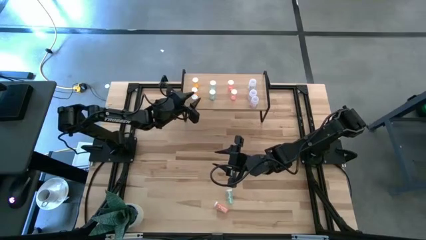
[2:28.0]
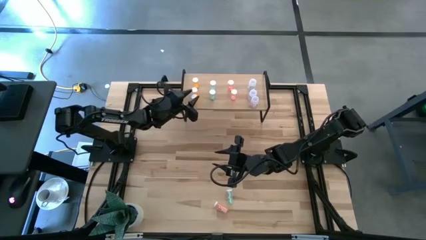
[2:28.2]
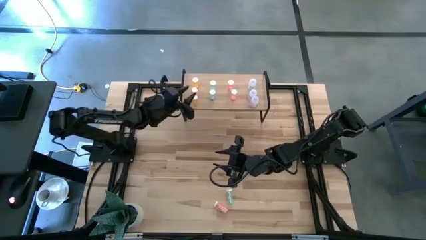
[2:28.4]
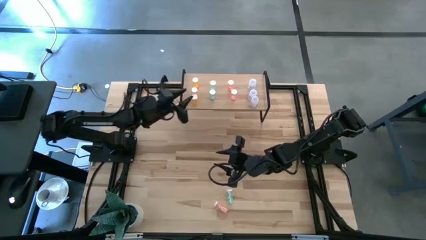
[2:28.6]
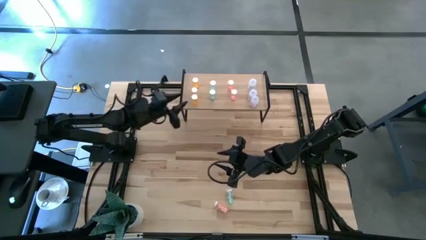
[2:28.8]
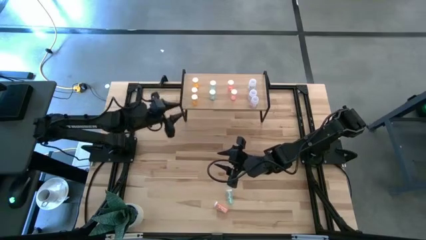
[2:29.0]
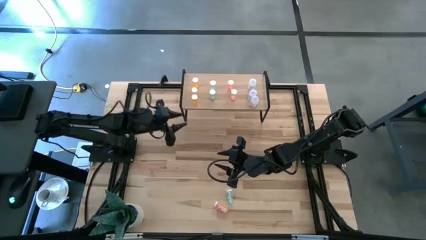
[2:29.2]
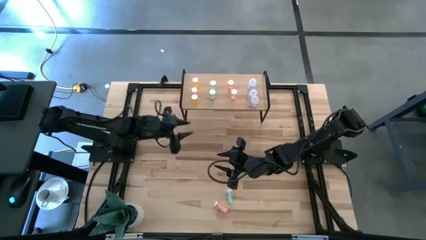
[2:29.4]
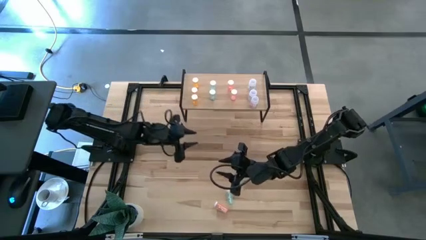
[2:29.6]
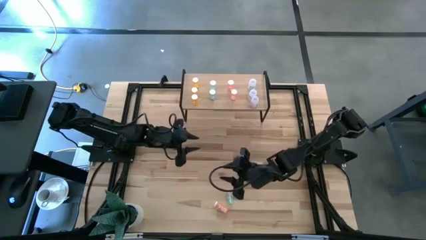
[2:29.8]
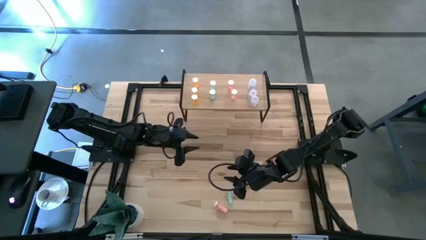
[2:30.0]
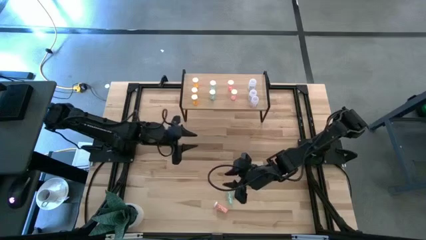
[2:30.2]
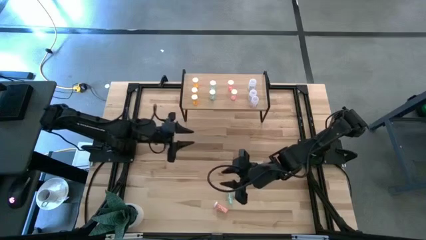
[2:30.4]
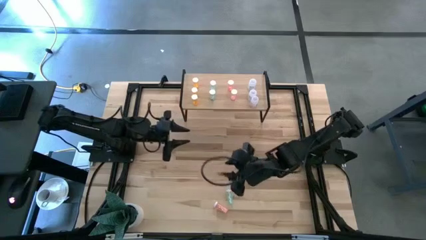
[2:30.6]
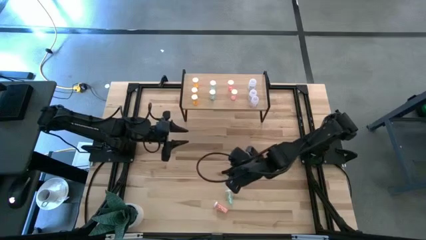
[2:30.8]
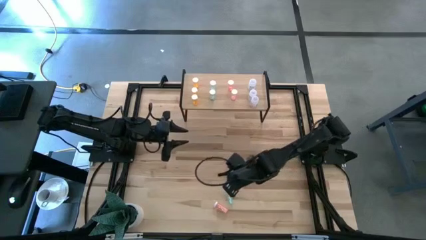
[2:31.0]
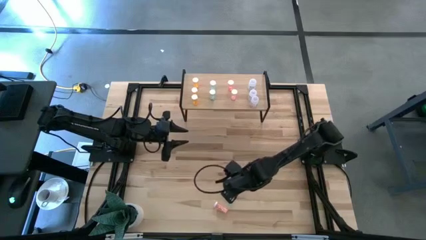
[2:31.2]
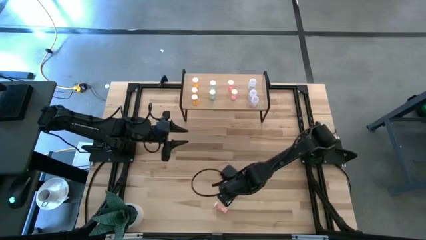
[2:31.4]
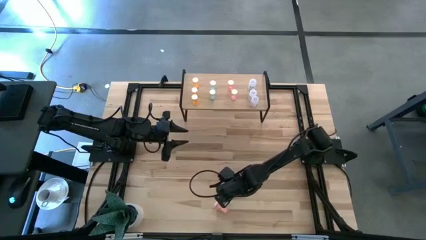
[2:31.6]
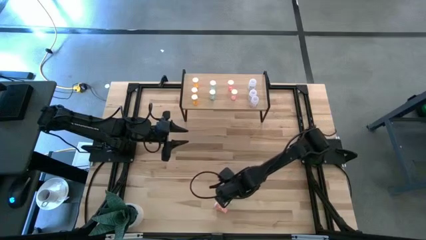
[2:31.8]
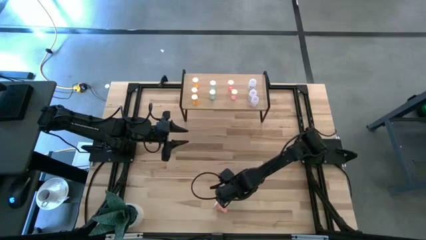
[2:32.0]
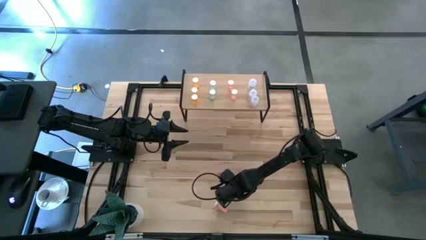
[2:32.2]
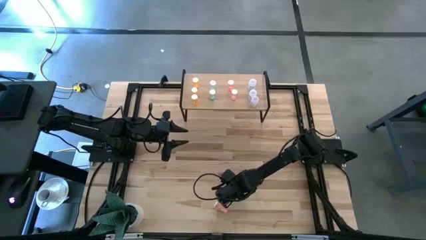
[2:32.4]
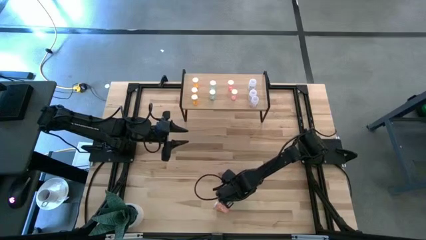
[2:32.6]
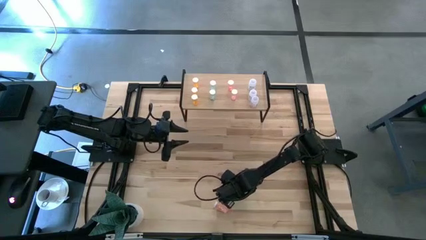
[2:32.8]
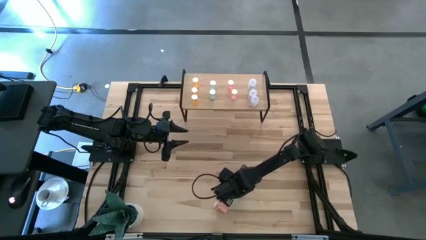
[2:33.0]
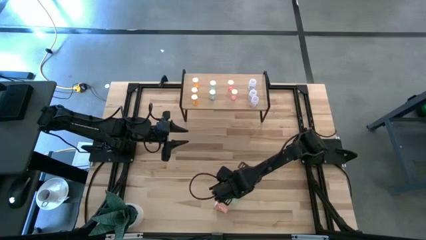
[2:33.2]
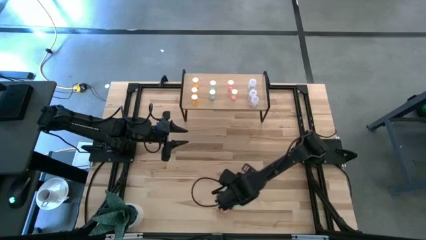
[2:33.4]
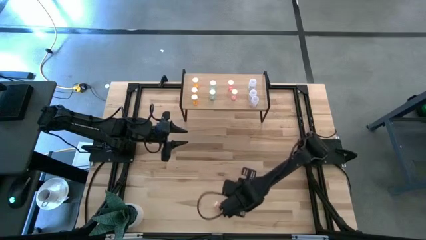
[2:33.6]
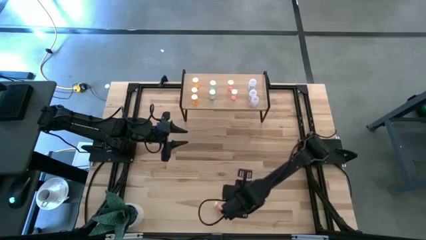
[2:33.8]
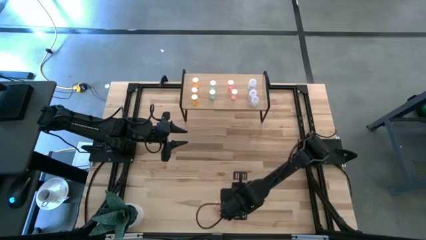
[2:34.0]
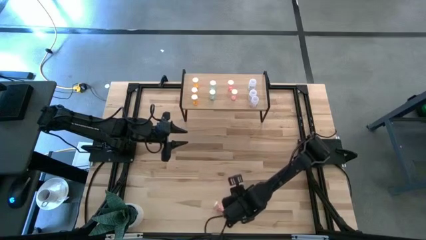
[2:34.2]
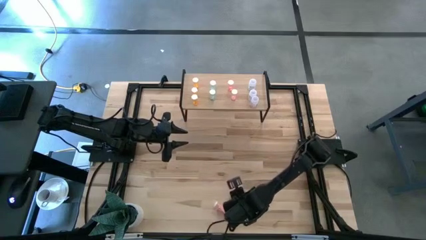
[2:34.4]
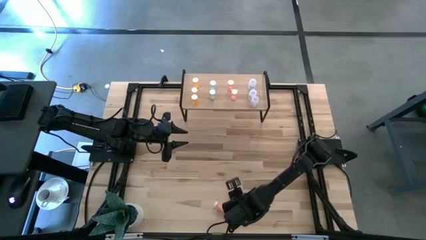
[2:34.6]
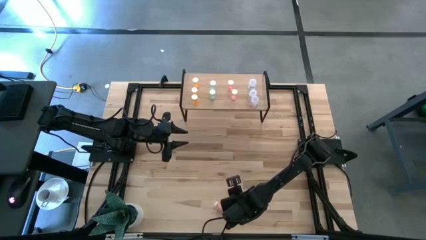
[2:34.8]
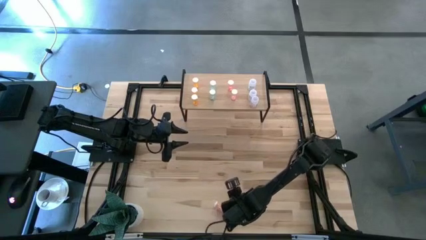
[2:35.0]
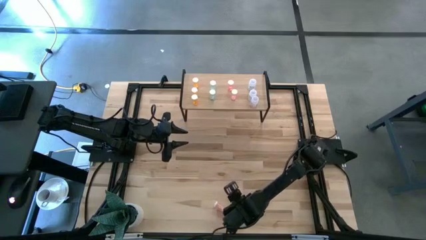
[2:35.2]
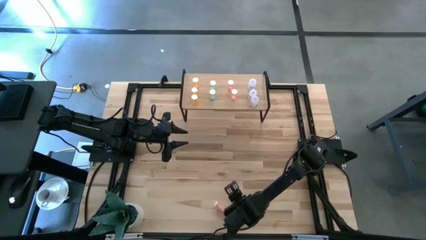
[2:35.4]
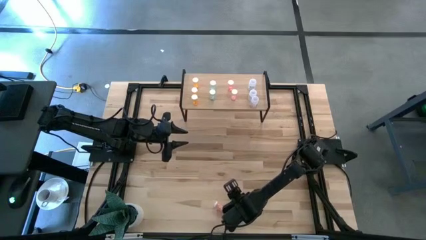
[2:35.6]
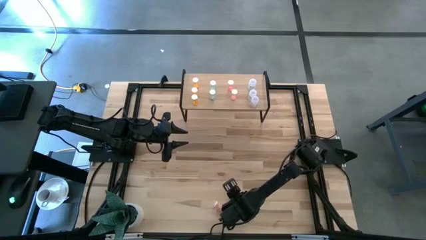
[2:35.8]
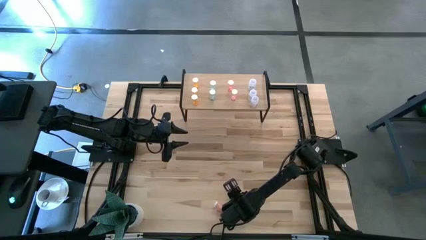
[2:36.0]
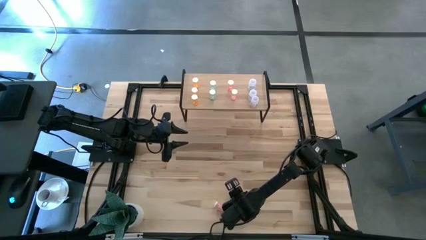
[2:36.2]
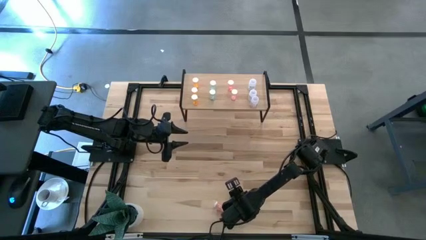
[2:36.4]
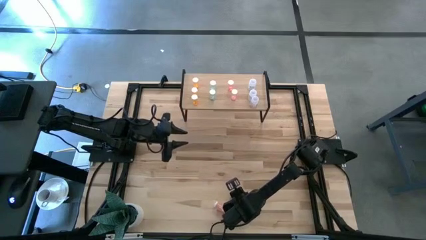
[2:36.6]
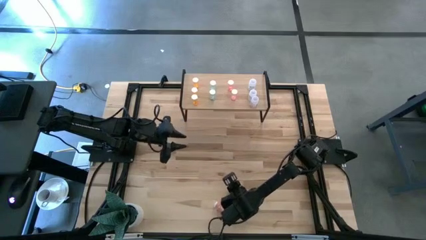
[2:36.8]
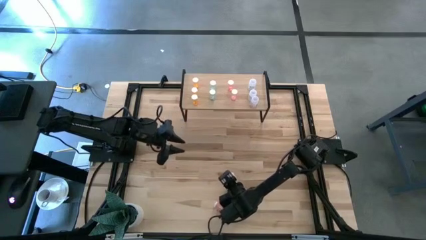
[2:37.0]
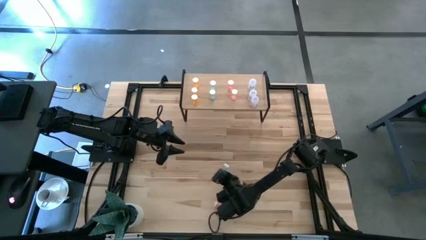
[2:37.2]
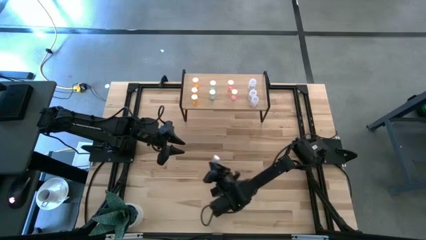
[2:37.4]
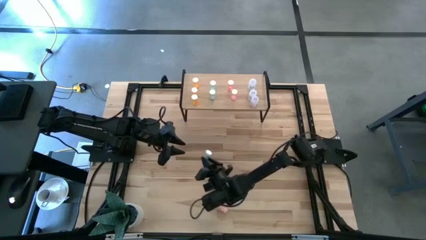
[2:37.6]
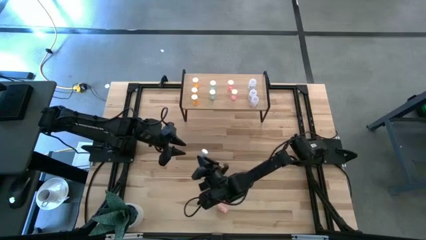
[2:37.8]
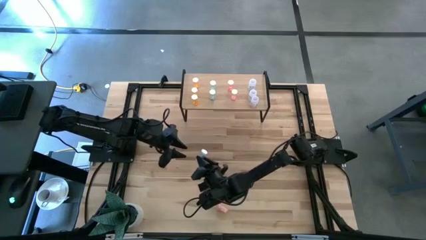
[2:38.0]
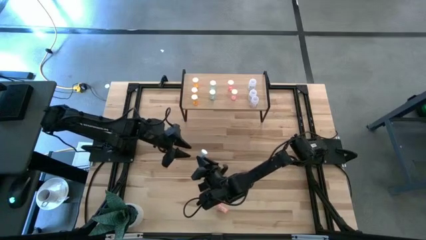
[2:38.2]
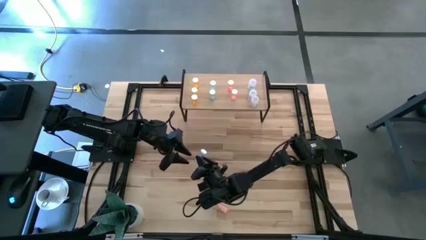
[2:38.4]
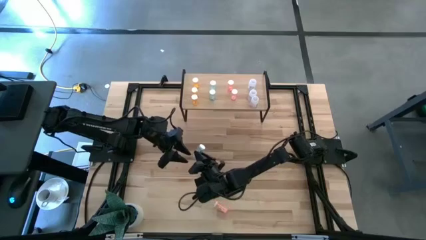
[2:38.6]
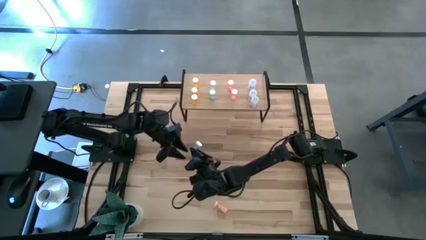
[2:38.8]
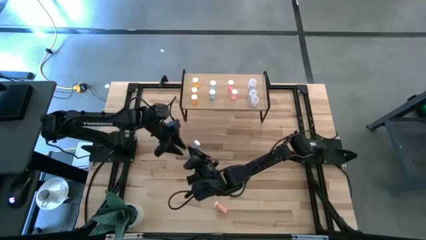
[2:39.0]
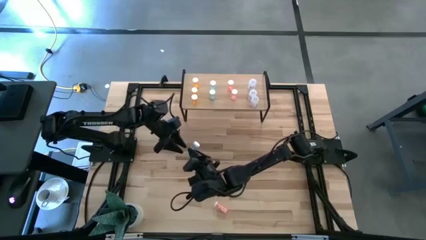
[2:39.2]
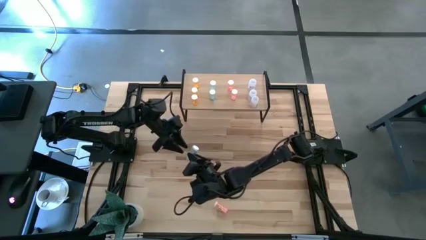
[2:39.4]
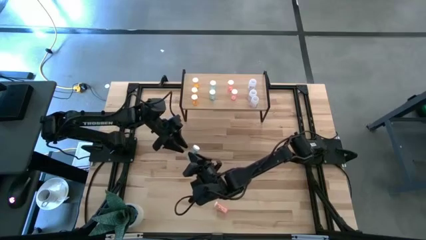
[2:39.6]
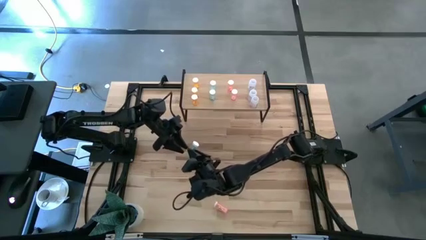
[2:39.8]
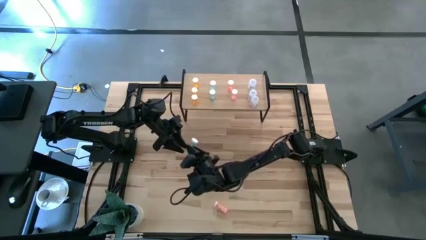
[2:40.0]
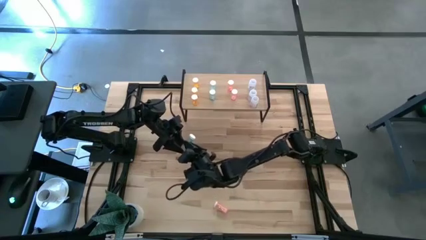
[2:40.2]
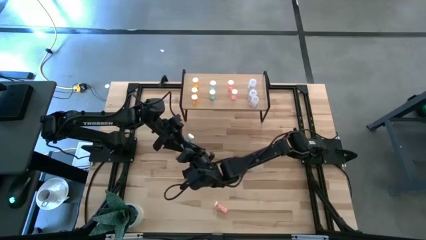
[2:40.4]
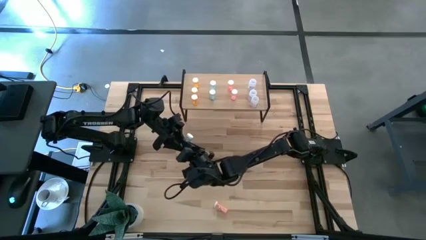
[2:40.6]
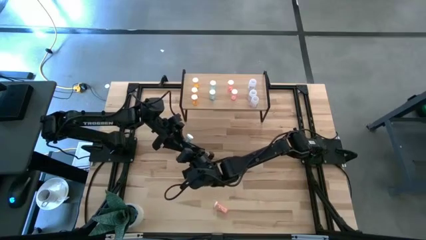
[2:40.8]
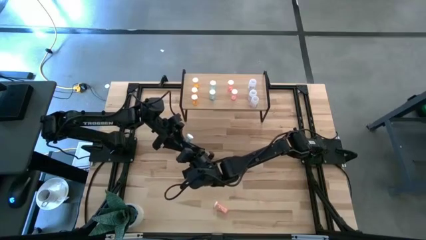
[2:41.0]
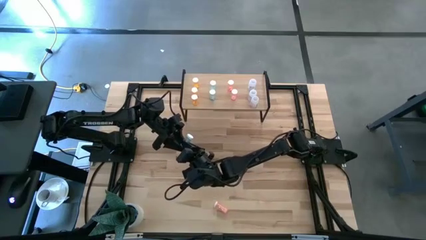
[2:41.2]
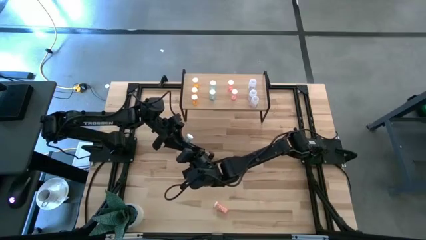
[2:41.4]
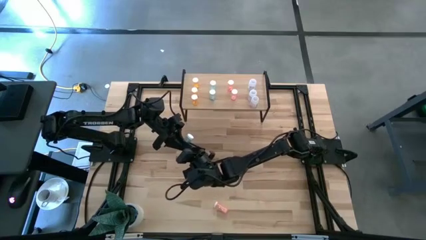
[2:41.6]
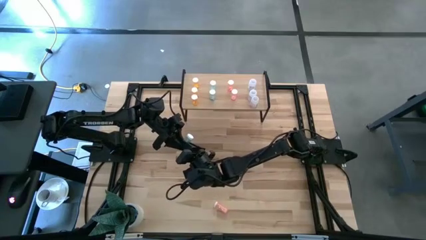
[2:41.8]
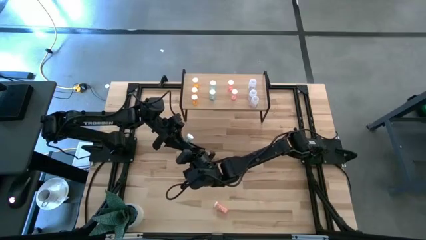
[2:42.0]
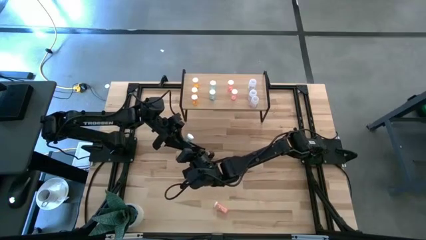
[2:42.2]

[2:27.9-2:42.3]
Task: Pick and place medicine bottles onto shelf by color
Put the blue pill bottle on the shelf aligned with the blue pill bottles
